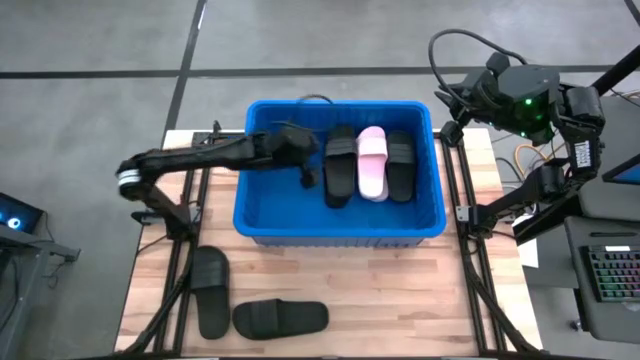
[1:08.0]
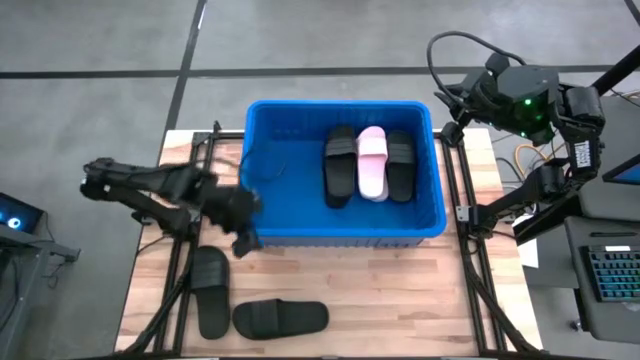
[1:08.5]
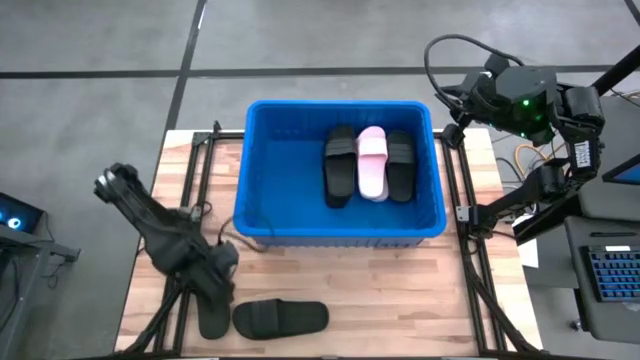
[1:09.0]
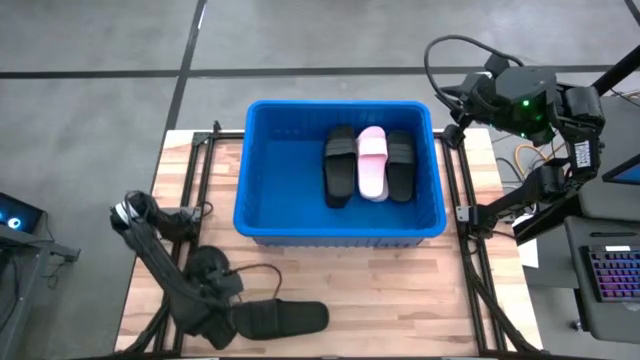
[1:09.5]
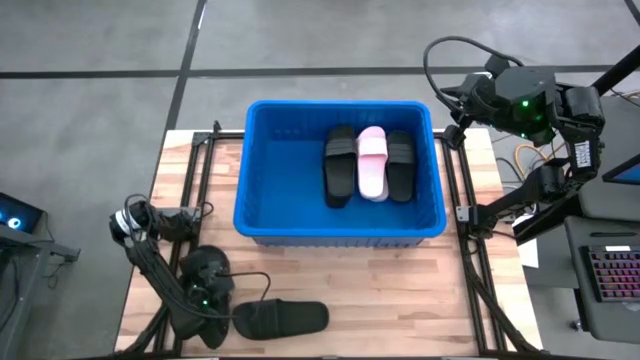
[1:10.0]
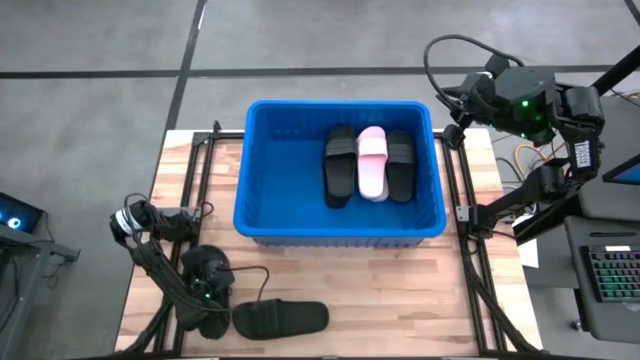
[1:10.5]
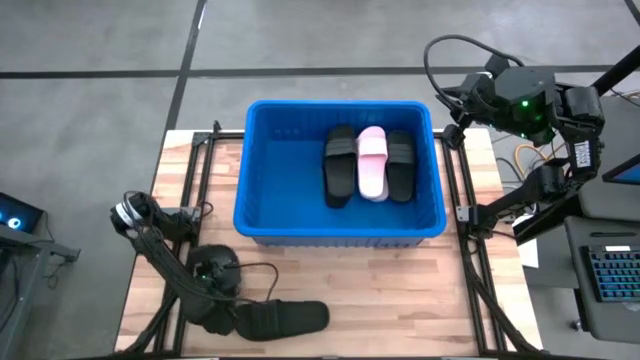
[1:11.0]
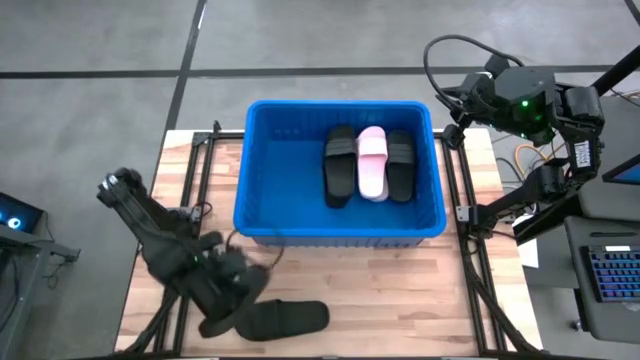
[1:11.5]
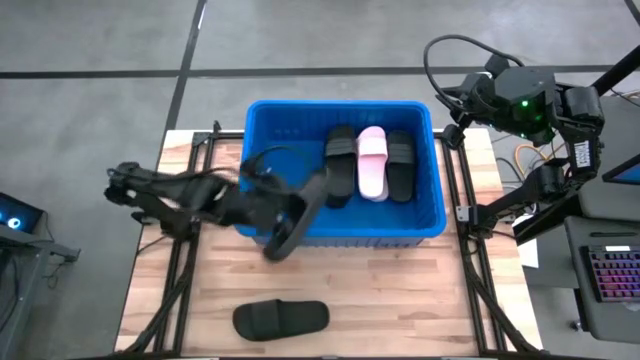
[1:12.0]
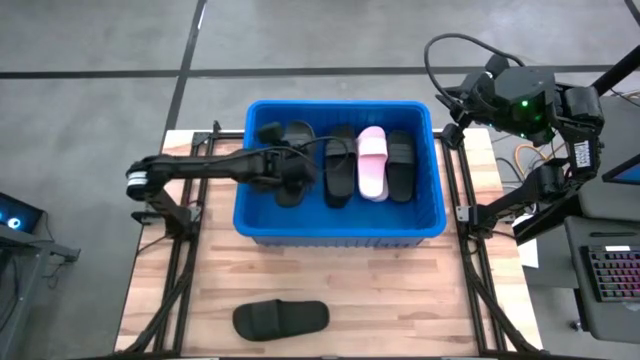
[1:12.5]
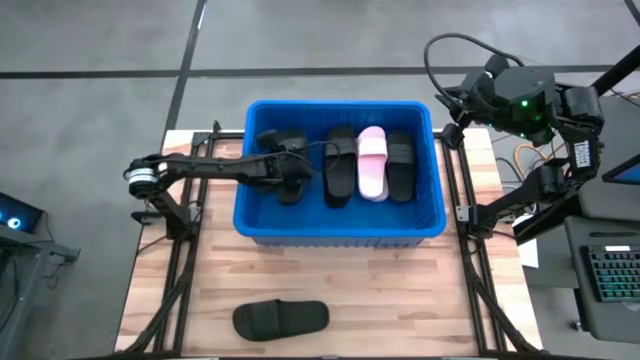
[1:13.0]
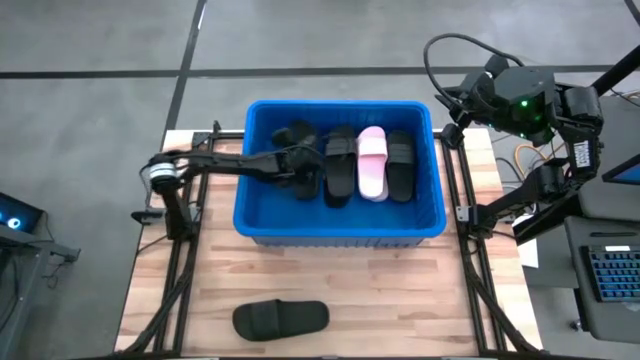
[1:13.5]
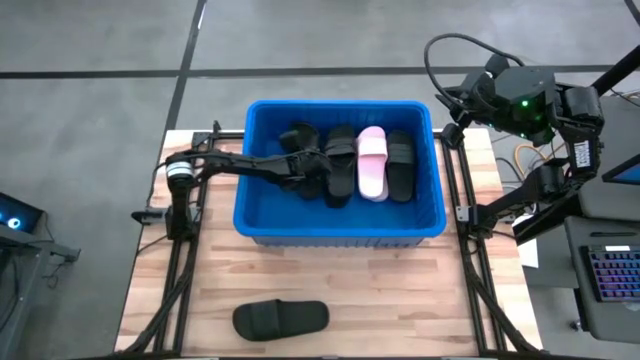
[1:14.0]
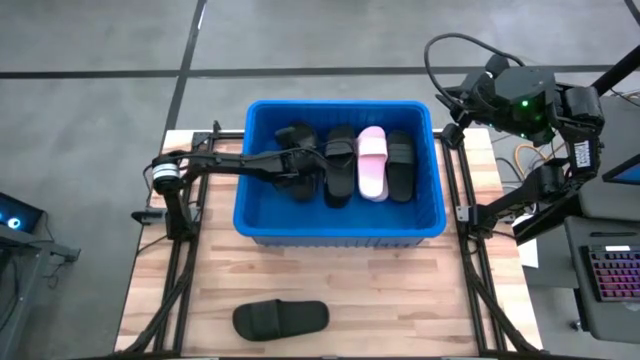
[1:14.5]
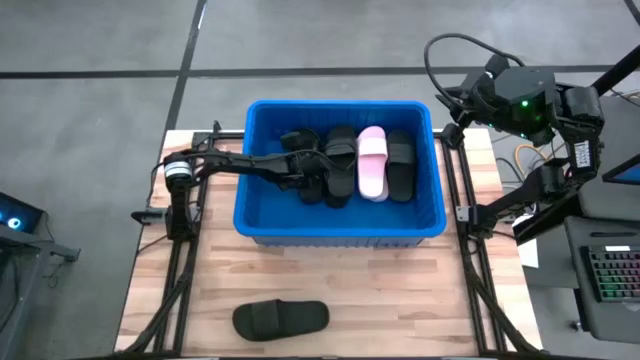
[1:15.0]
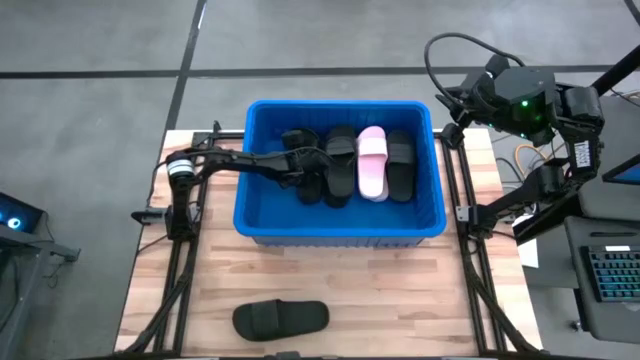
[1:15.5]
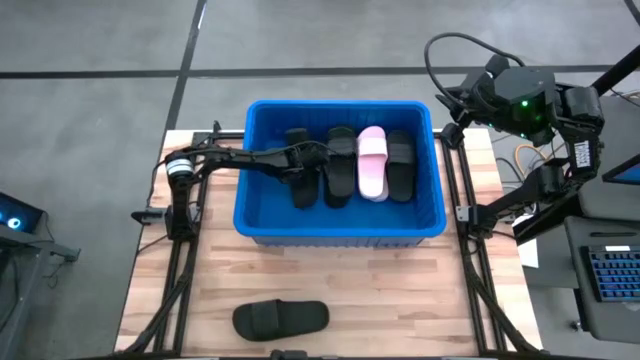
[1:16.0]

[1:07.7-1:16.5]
Task: Pick and place slides into bin
Put the black slide into the blue bin

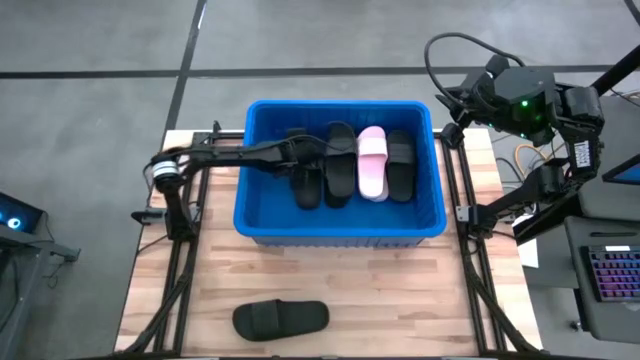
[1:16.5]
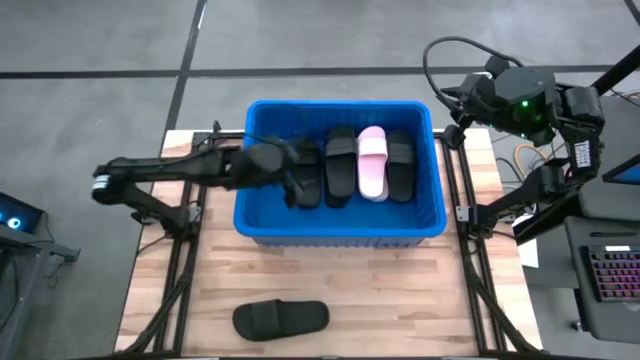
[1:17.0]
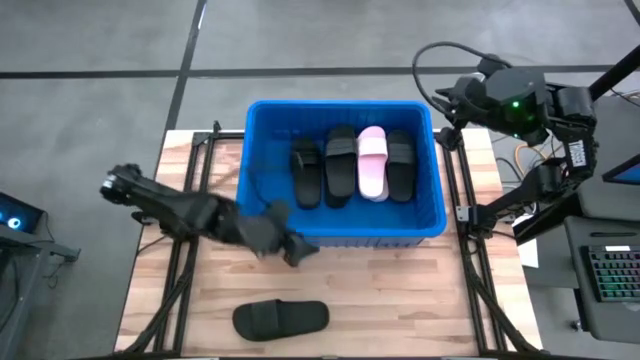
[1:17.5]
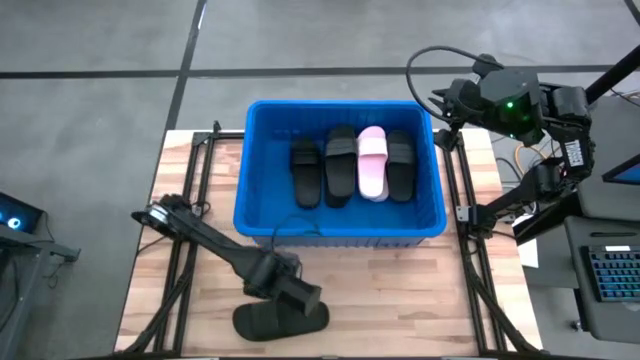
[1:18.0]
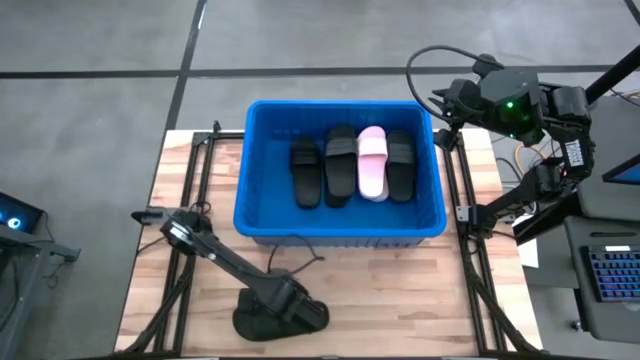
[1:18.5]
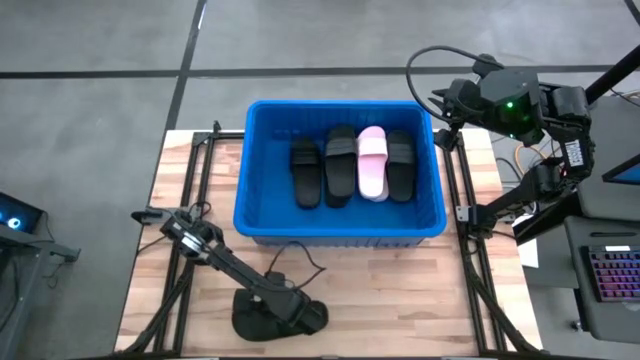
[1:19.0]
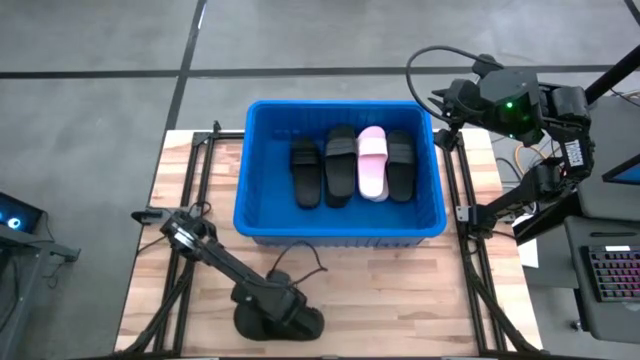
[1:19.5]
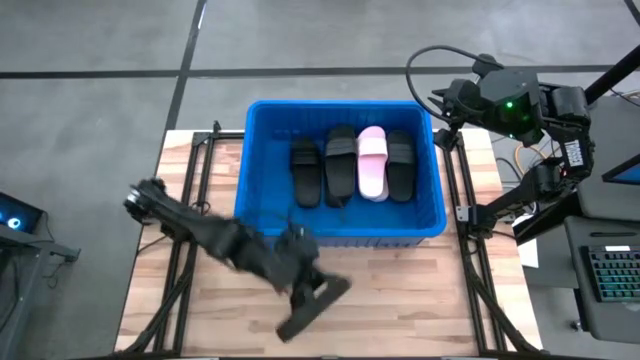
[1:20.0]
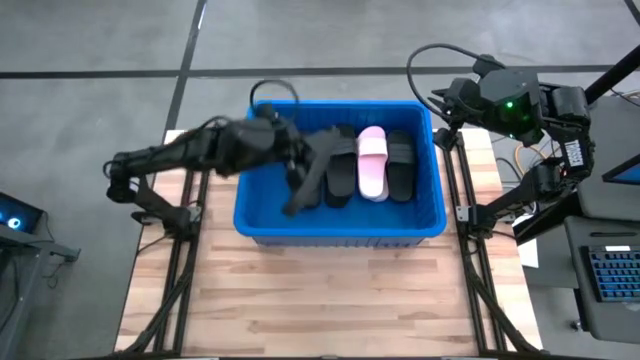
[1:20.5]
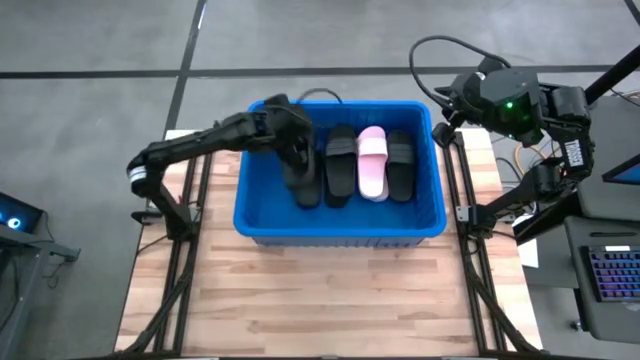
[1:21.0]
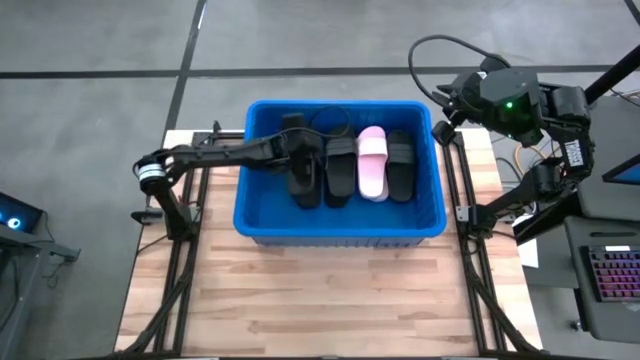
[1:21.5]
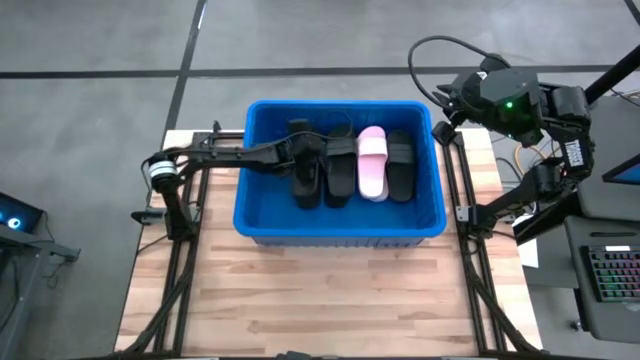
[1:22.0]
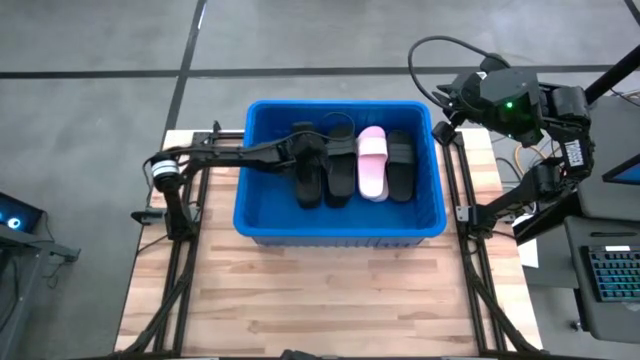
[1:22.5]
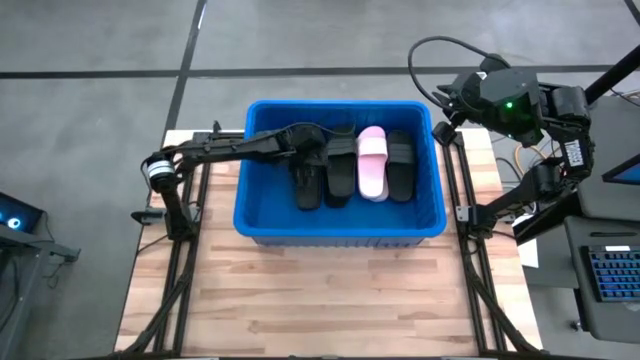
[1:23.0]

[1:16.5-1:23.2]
Put the black slide into the blue bin

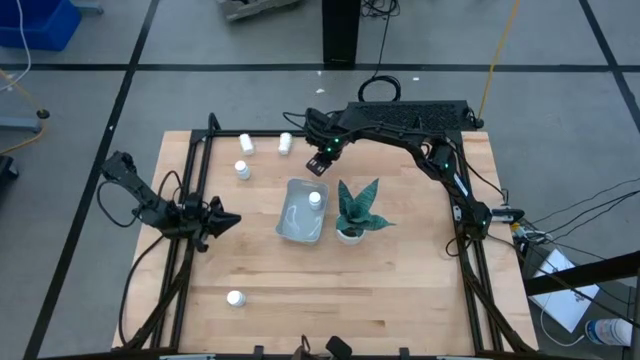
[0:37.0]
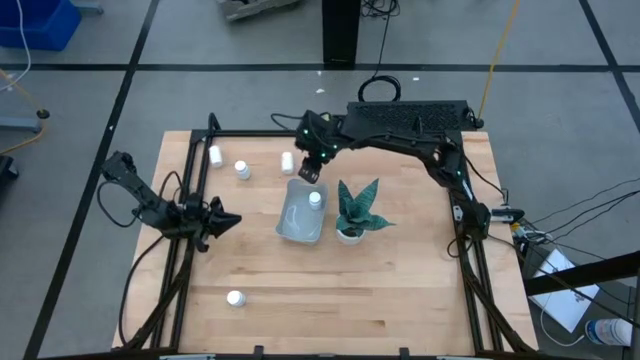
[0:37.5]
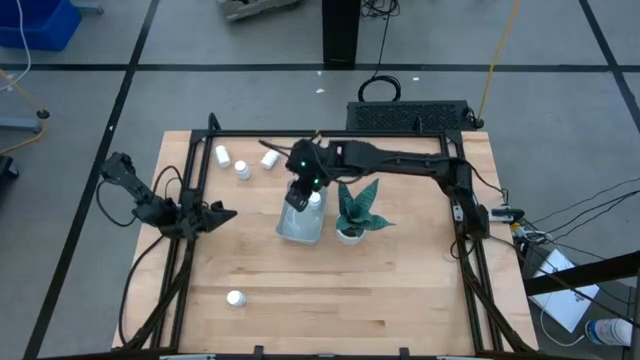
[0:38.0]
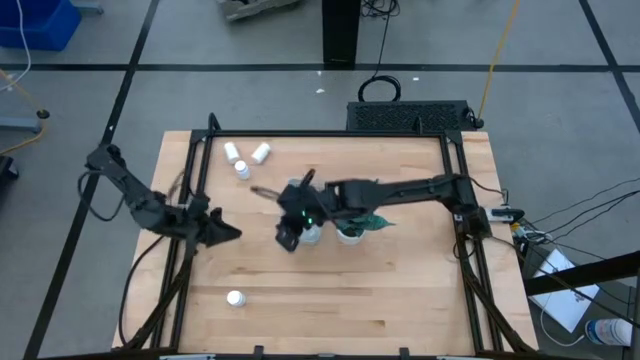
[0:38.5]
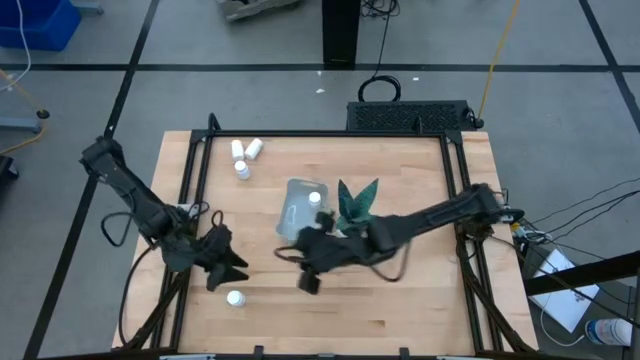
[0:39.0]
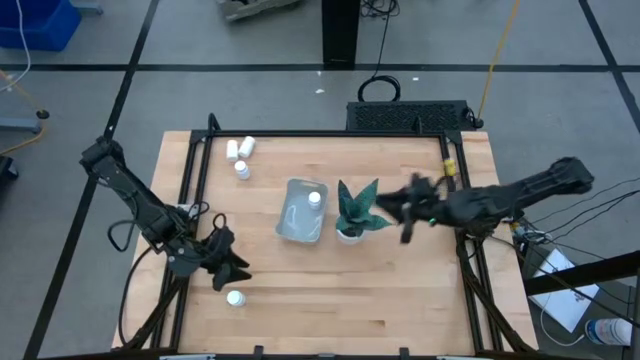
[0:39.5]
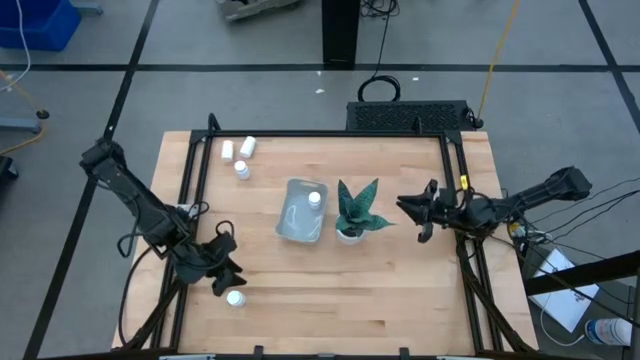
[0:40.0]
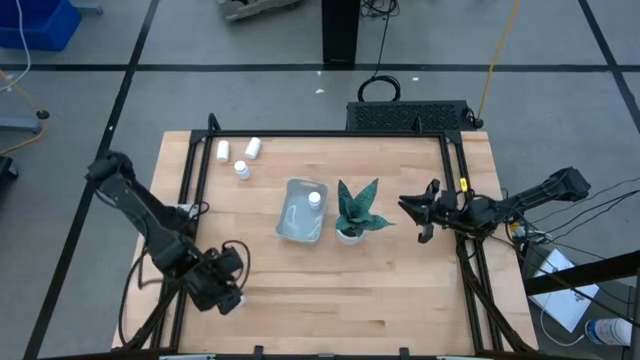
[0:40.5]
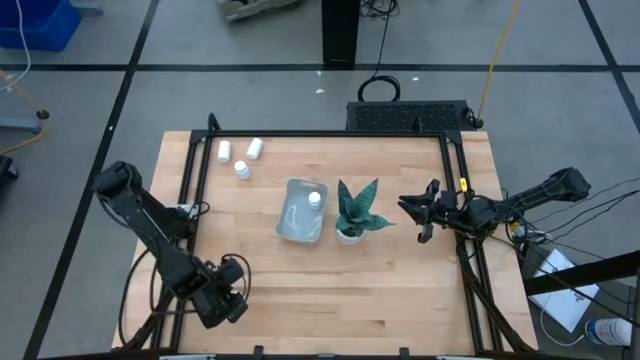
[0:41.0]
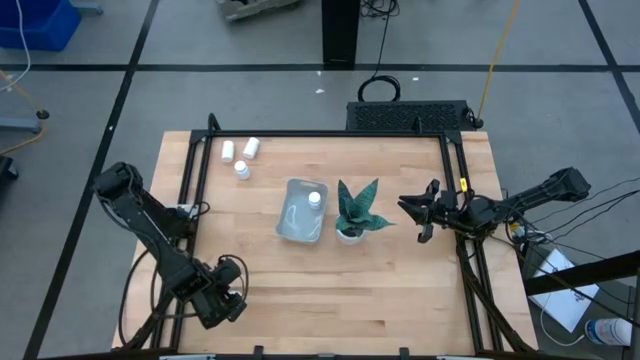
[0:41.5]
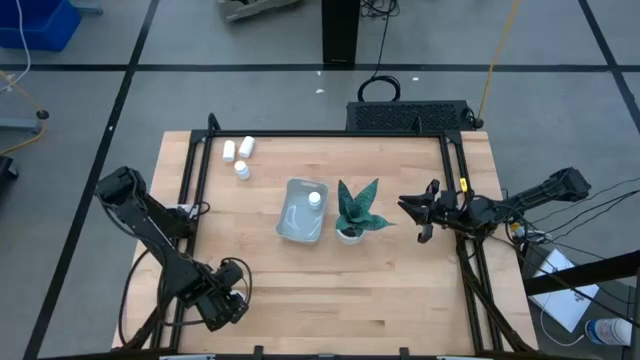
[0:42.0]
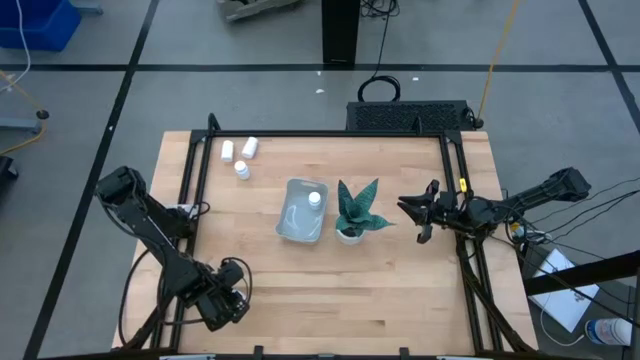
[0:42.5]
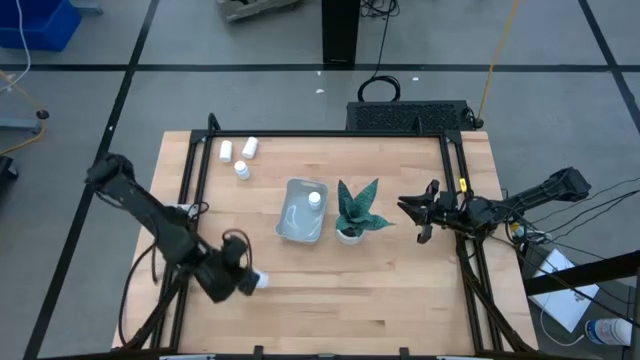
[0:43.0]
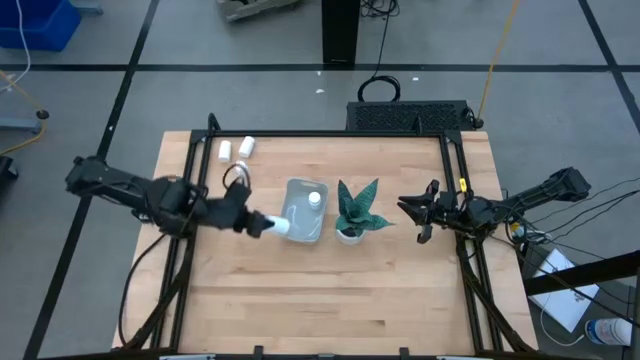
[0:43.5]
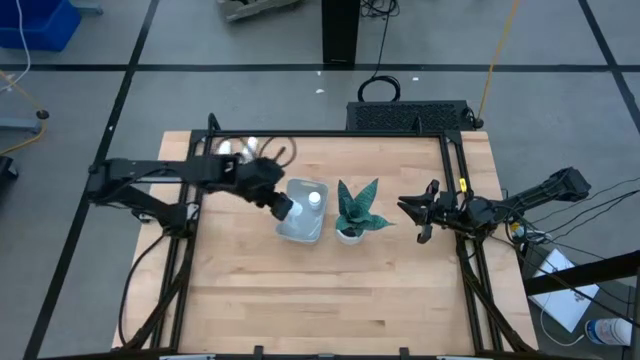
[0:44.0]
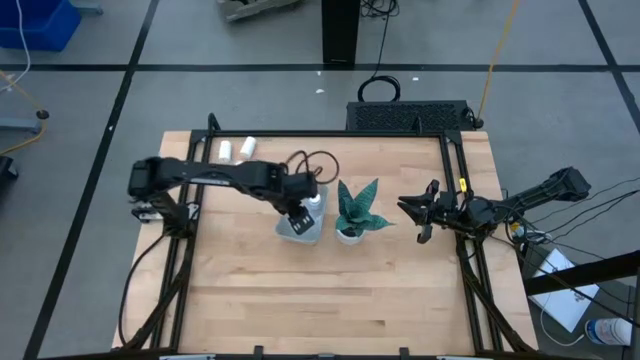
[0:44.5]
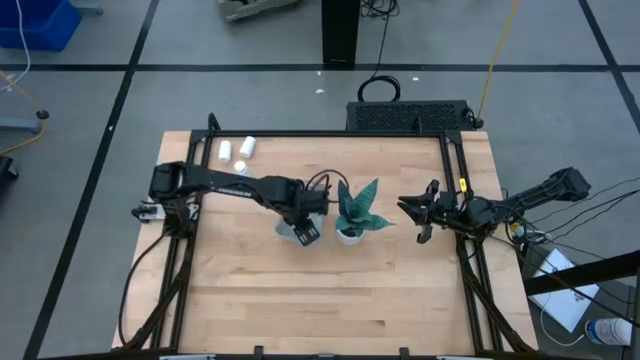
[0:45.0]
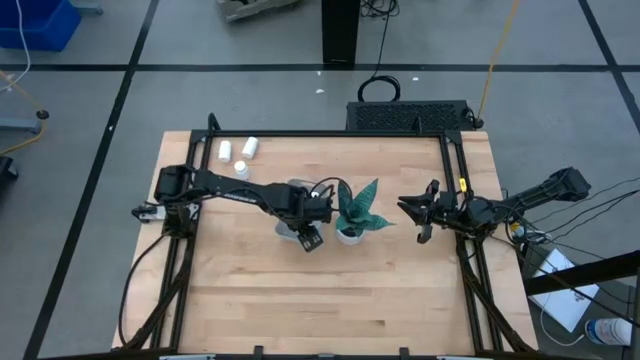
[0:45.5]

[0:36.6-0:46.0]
Task: Pick and place pill bottles into a basket
Put the white pill bottle into the gray bin
